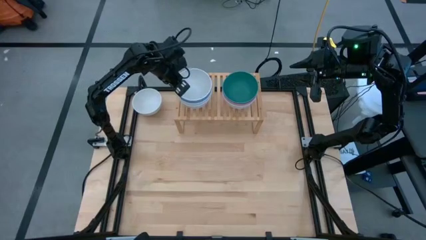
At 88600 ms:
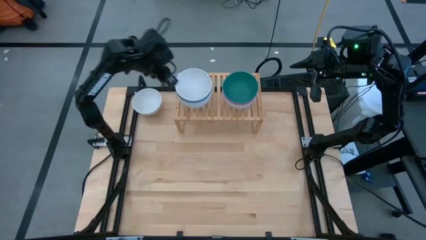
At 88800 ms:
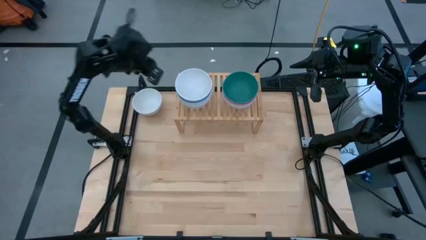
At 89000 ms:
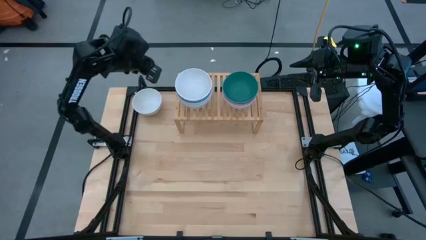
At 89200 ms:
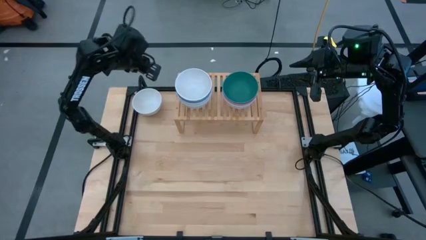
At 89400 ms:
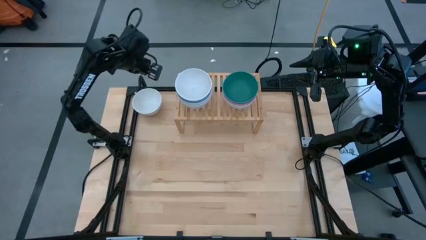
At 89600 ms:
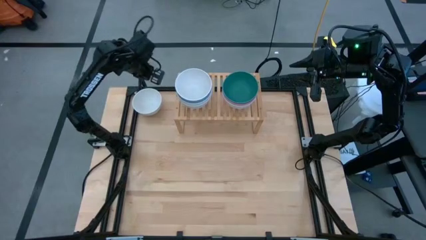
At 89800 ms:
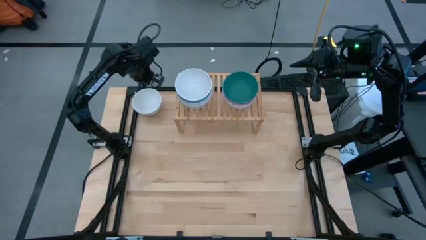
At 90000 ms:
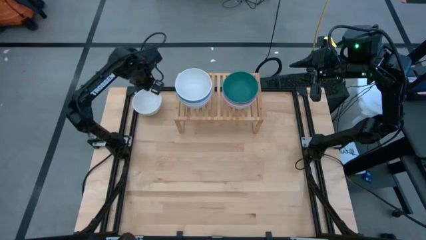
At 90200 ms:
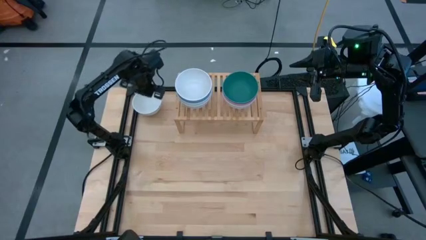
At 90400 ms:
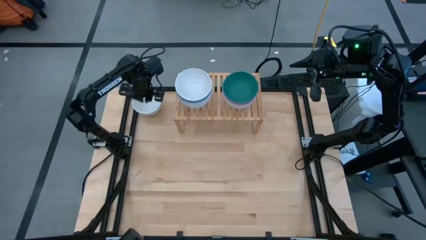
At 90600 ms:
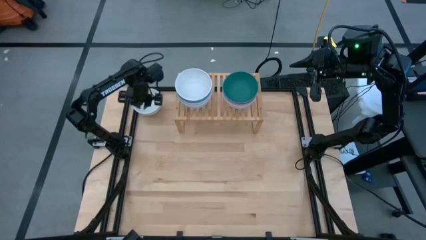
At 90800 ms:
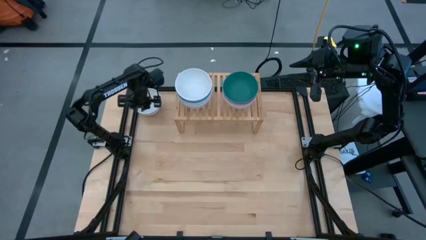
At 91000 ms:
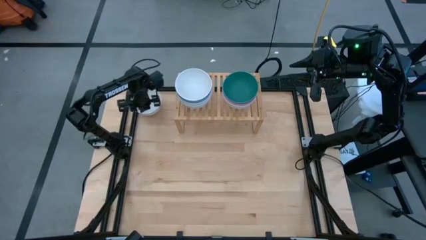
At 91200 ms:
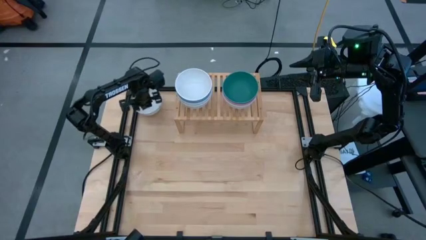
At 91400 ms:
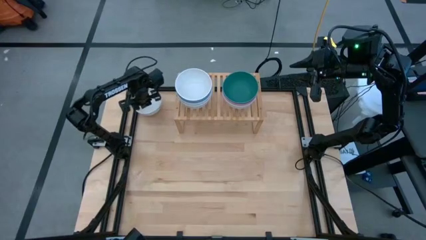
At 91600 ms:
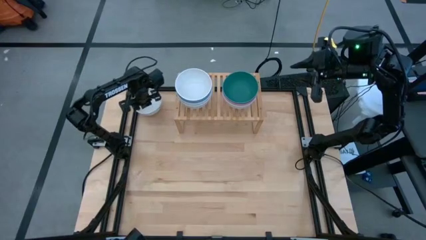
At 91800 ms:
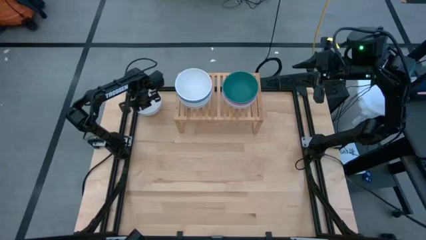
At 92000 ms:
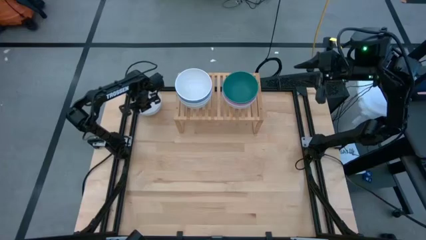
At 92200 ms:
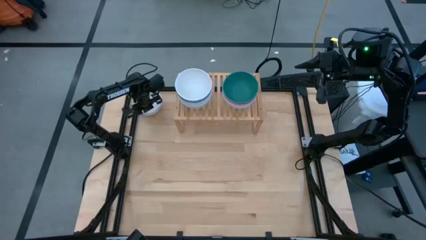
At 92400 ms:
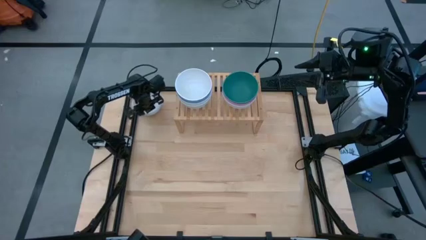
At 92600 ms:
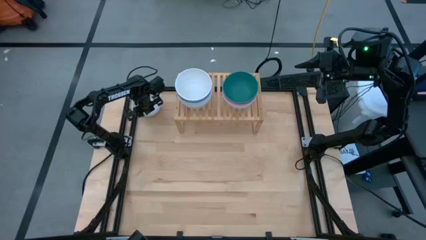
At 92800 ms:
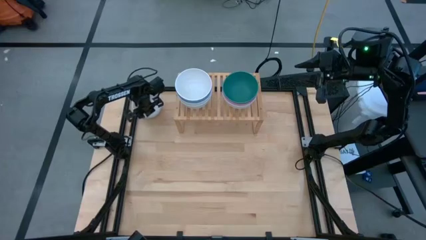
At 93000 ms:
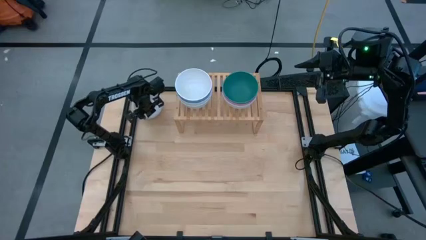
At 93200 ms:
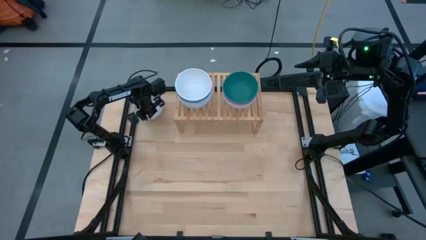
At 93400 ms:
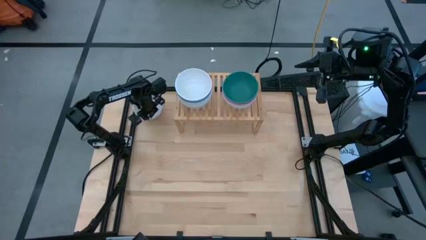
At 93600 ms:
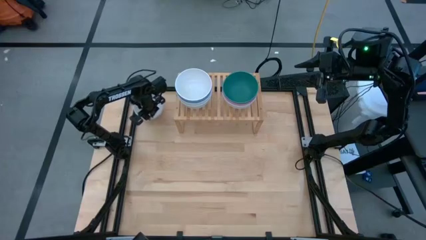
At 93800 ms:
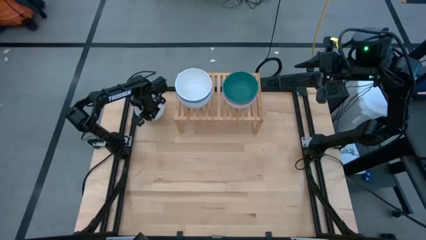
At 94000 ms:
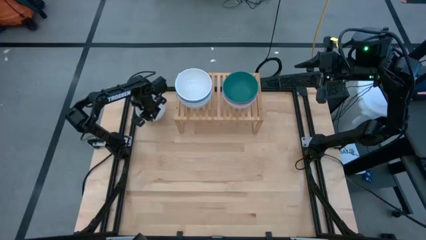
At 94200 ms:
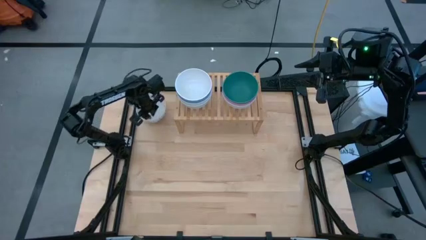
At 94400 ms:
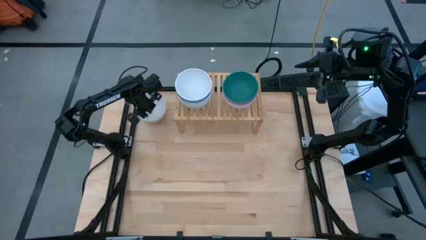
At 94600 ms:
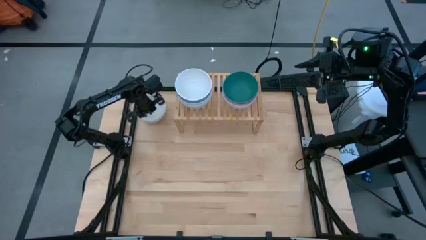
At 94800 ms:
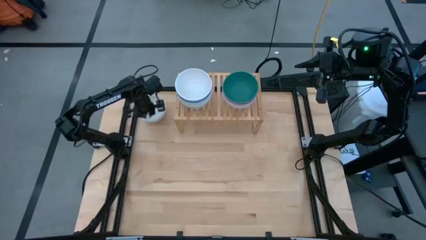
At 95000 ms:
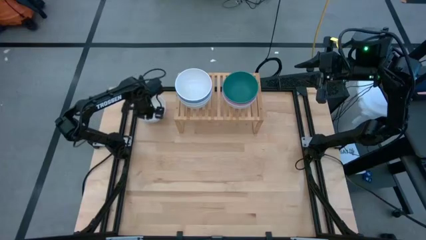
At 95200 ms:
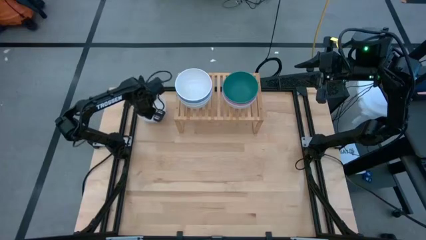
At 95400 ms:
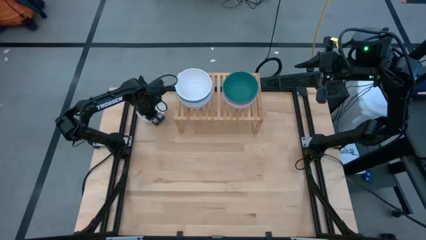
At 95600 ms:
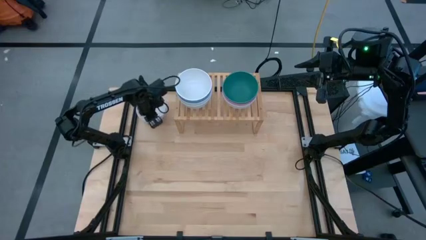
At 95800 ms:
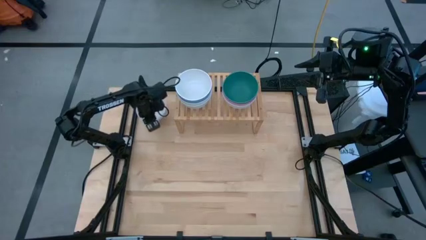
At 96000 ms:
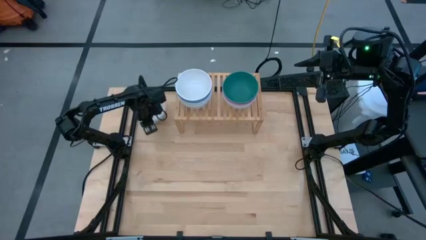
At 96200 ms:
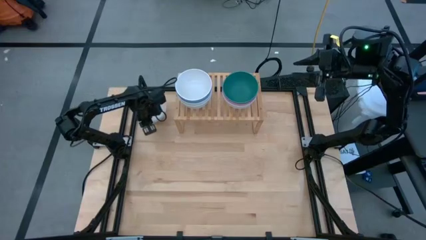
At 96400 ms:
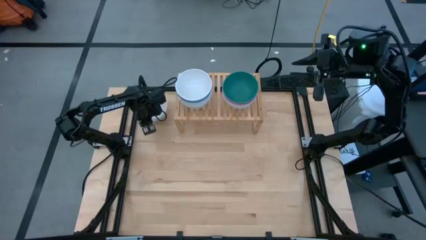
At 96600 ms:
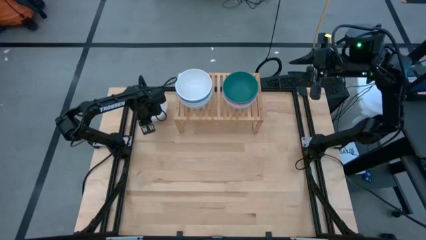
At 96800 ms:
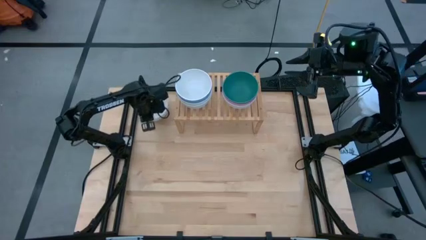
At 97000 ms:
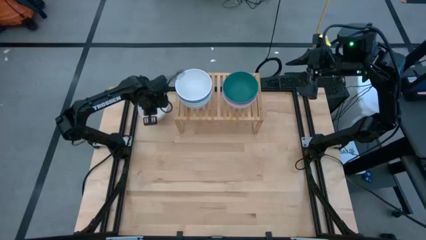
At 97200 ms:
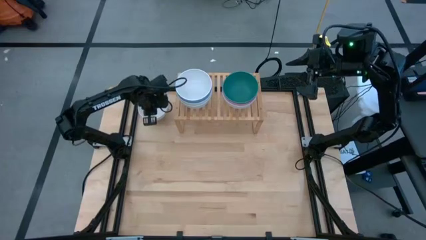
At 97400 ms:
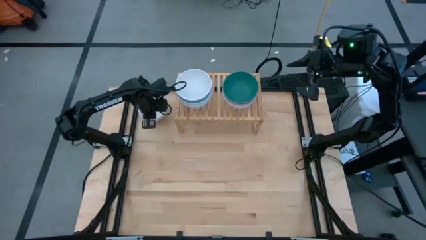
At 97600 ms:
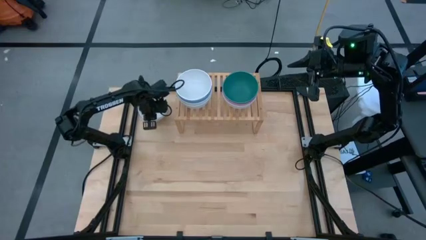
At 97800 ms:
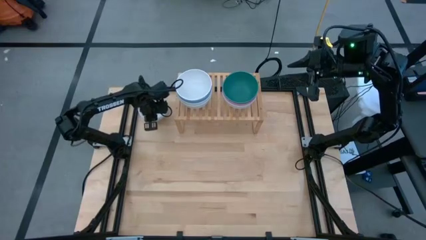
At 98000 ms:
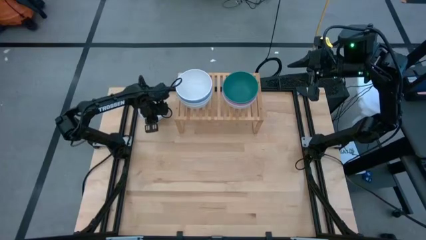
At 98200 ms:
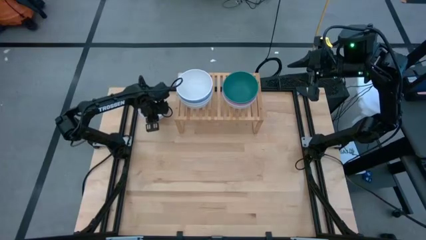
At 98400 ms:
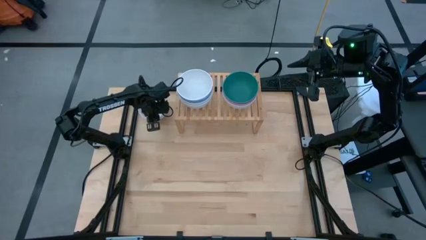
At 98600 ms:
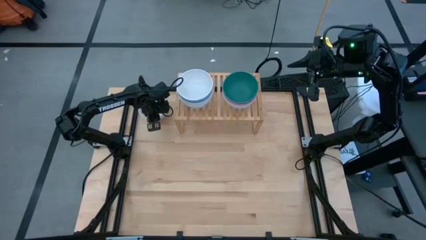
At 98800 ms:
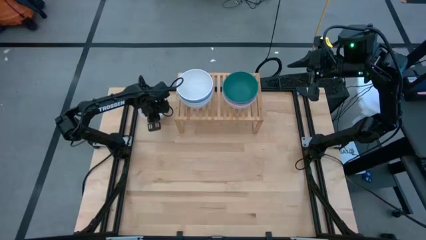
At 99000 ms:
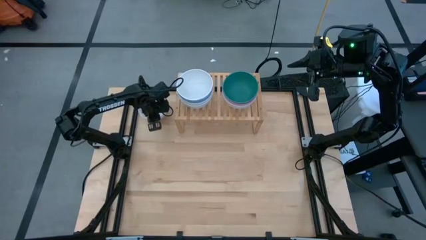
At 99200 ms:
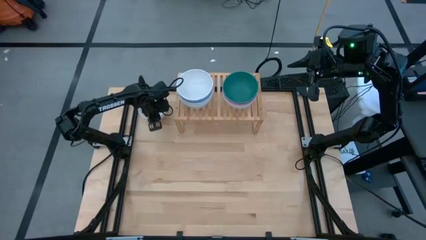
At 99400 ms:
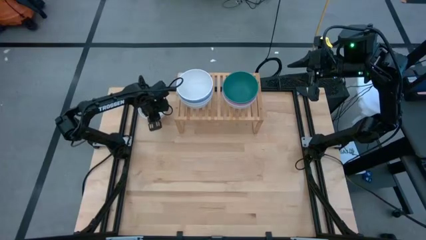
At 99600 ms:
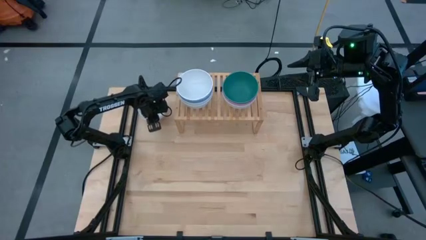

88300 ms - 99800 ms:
Task: Place and stack bowls onto a shelf
Stack the white bowl on top of the green bowl on the shelf
